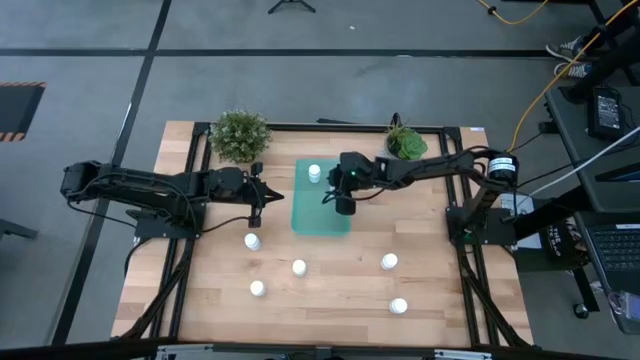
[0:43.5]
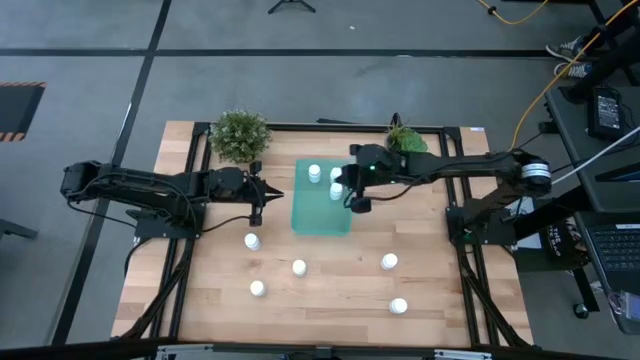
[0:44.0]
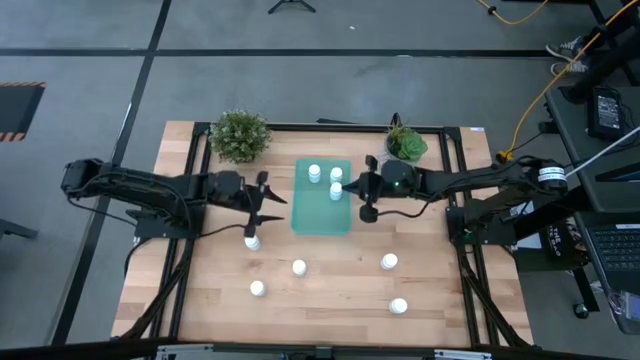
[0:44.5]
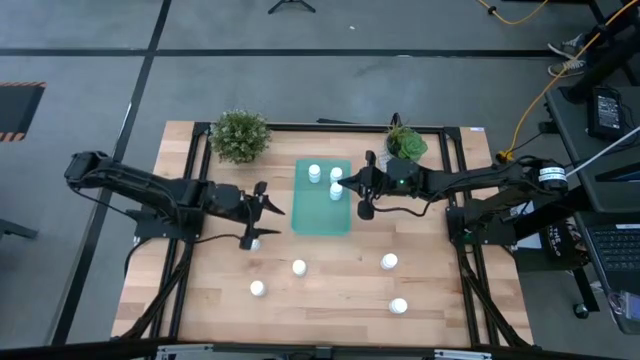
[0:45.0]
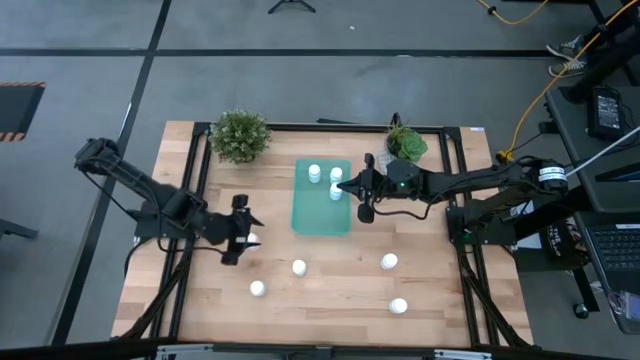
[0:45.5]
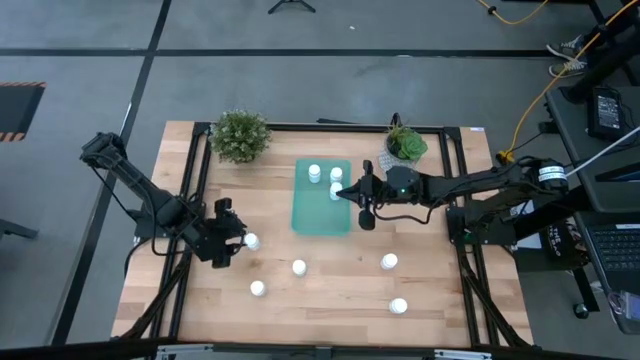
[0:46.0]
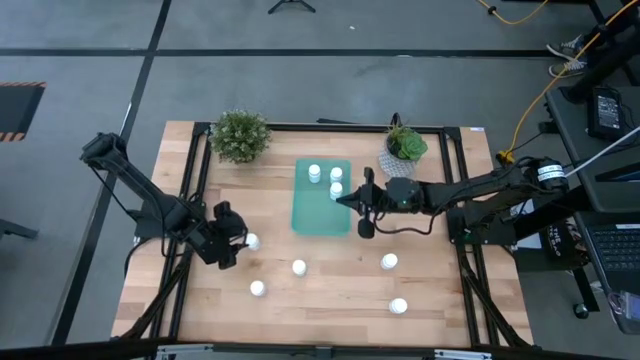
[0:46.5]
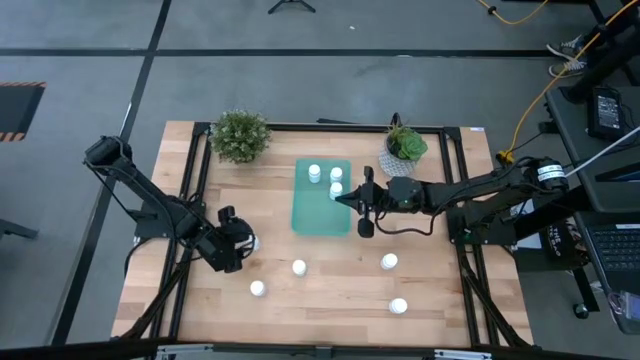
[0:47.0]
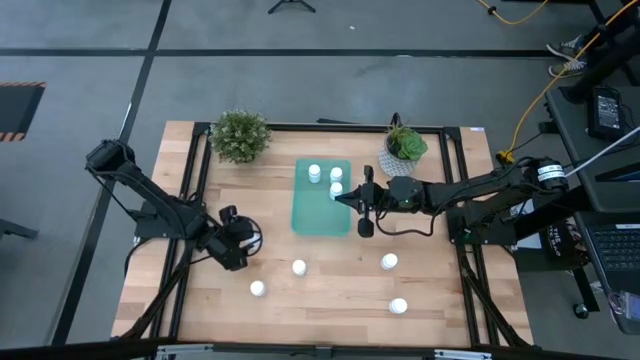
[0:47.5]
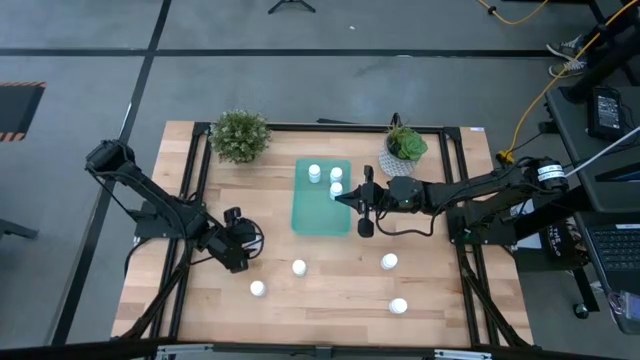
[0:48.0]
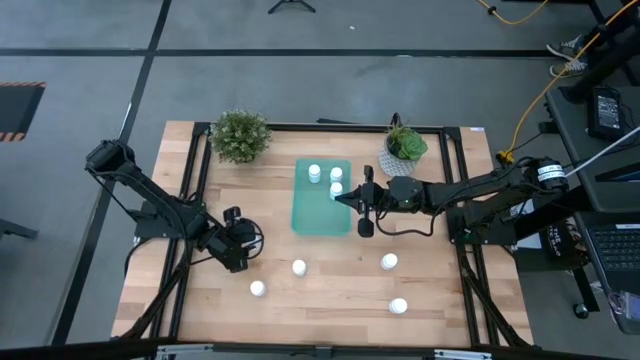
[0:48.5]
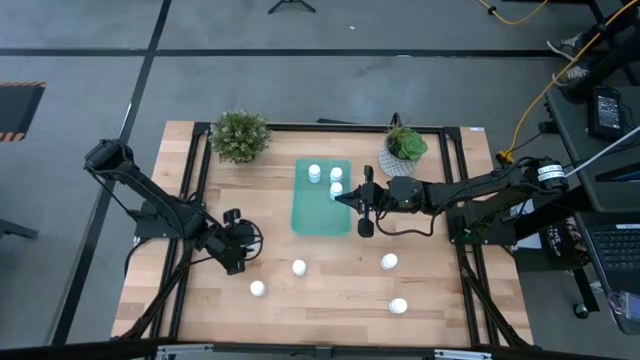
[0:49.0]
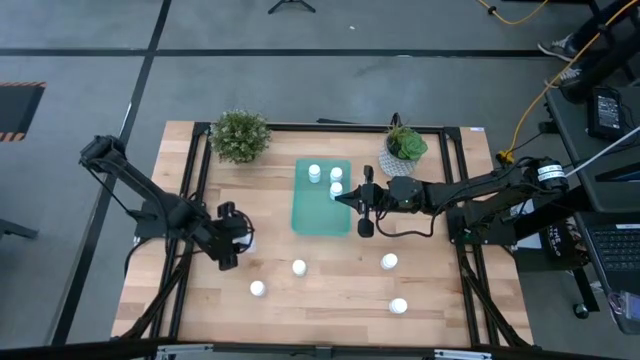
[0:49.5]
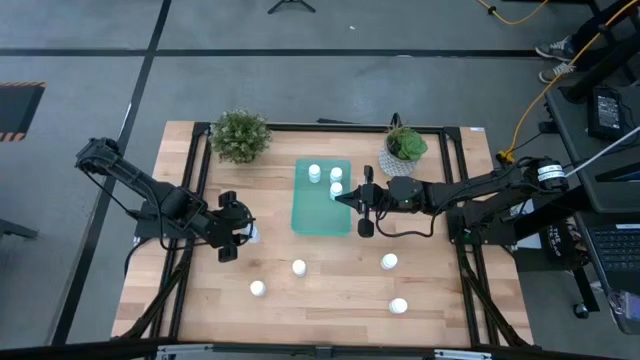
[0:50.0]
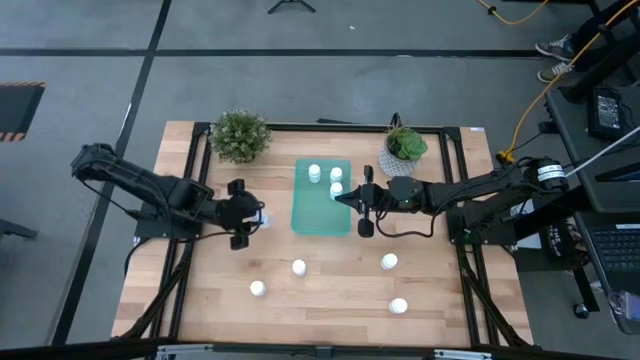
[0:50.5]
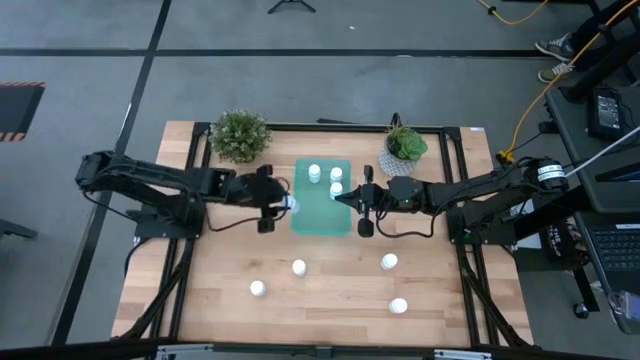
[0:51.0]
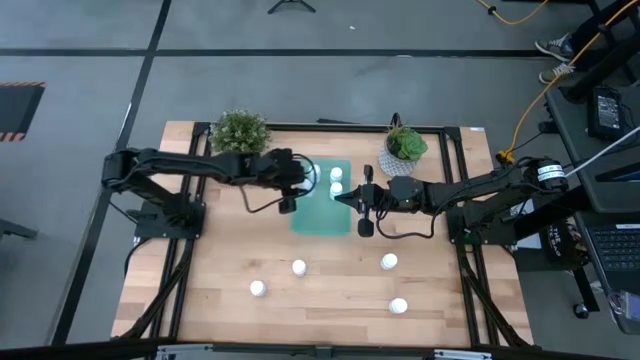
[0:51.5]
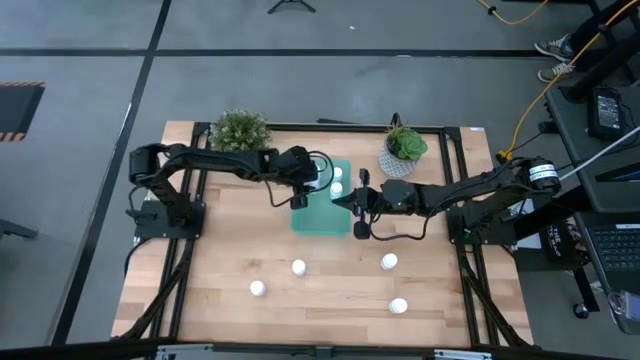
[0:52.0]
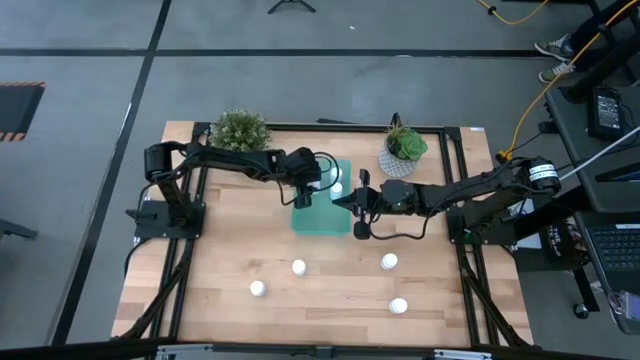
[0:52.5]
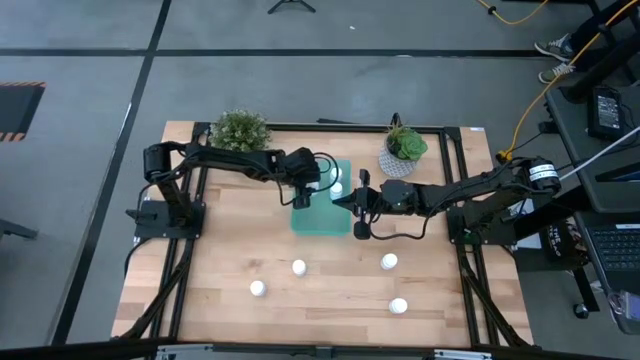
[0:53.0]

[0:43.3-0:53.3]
Task: Pick and place pill bottles into a basket
Put the white pill bottle into the green bin

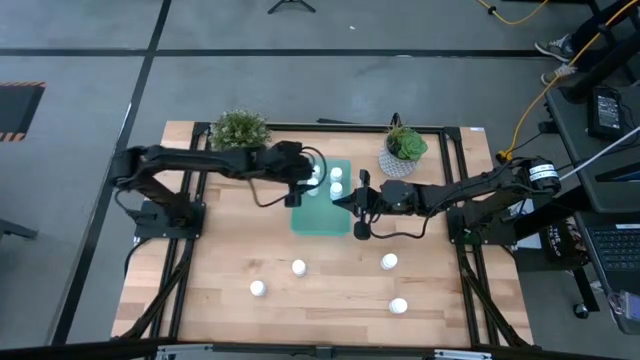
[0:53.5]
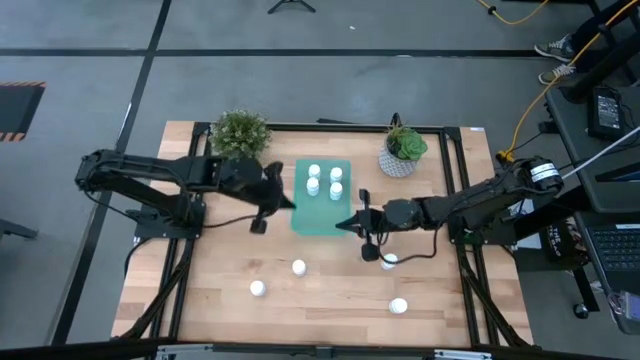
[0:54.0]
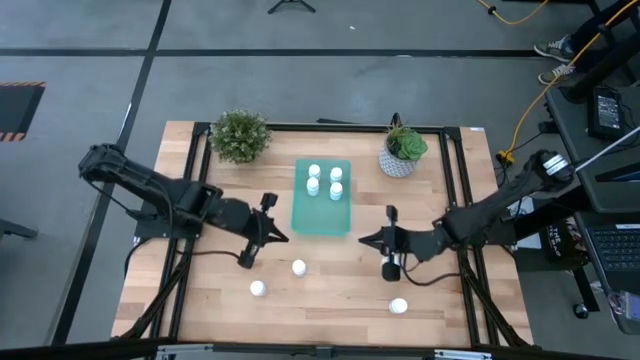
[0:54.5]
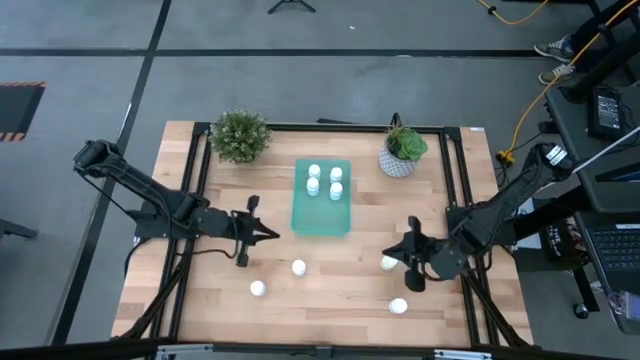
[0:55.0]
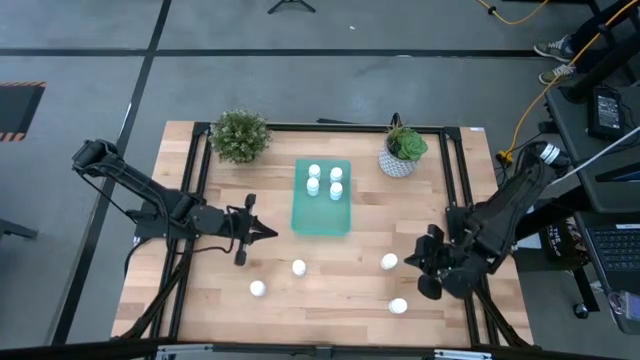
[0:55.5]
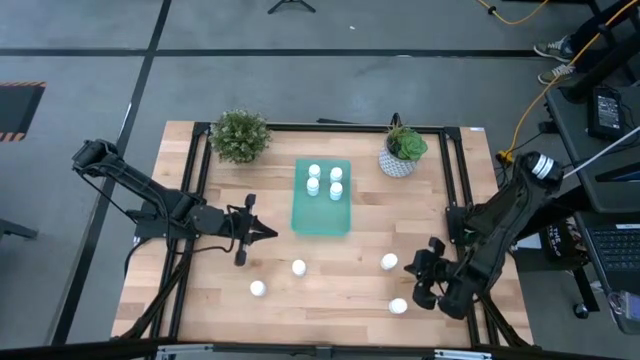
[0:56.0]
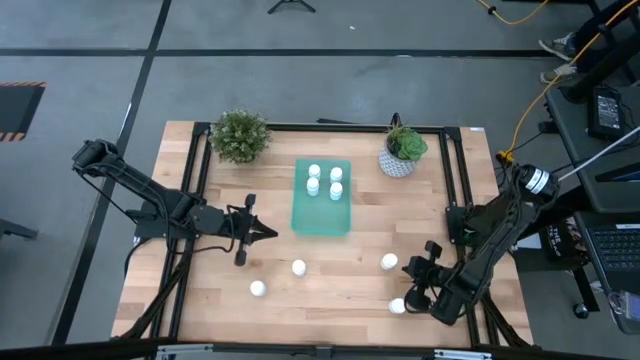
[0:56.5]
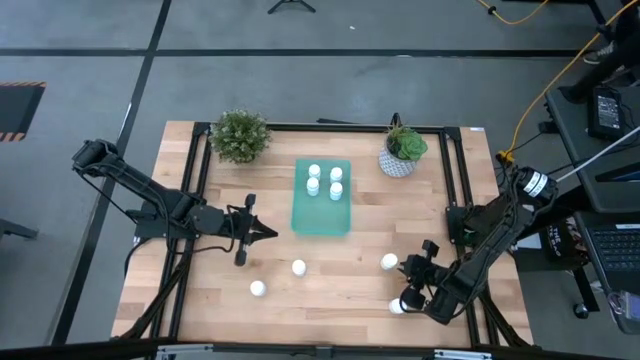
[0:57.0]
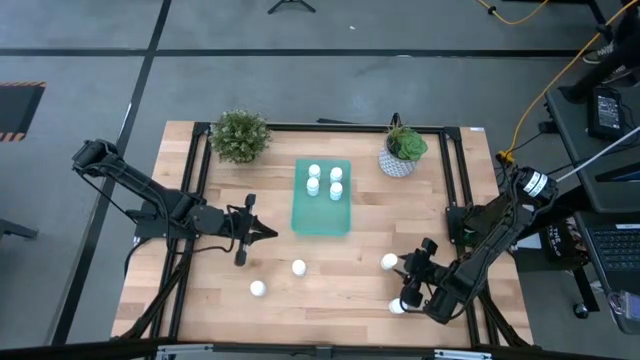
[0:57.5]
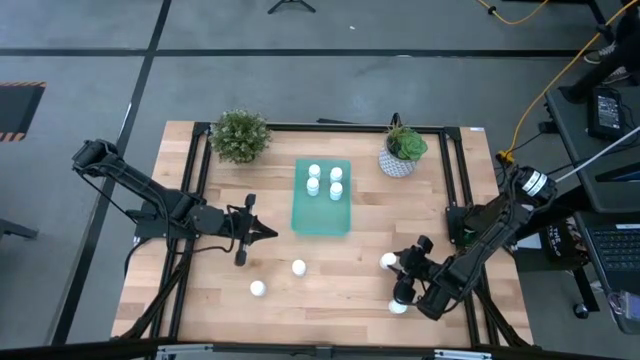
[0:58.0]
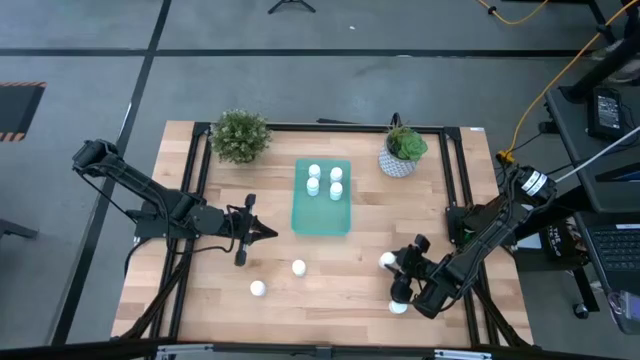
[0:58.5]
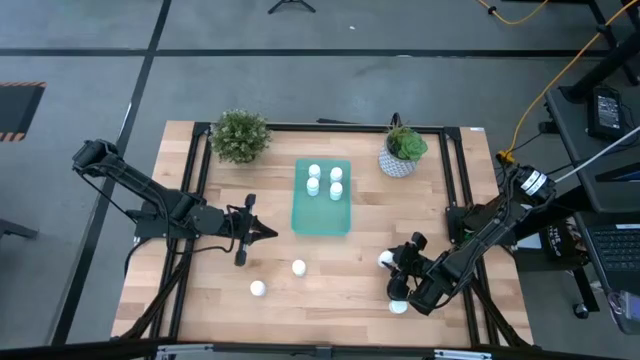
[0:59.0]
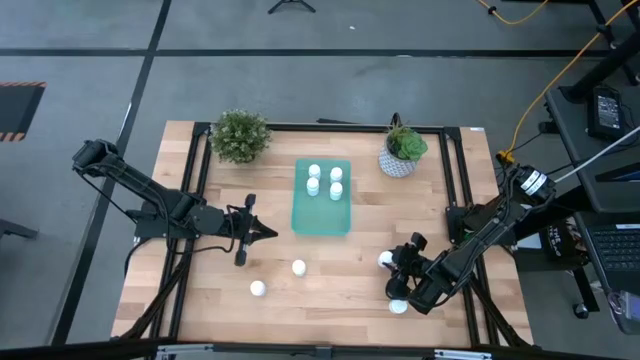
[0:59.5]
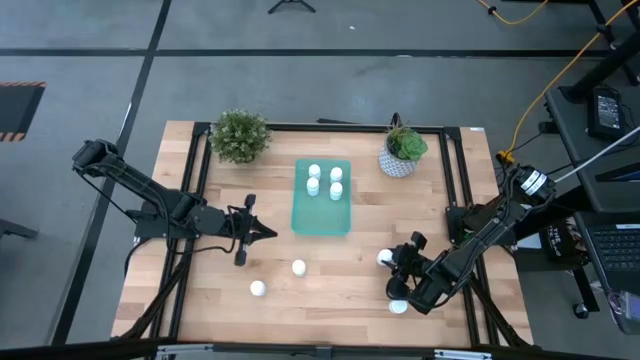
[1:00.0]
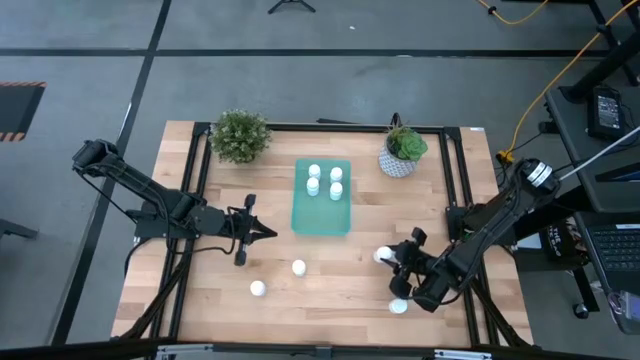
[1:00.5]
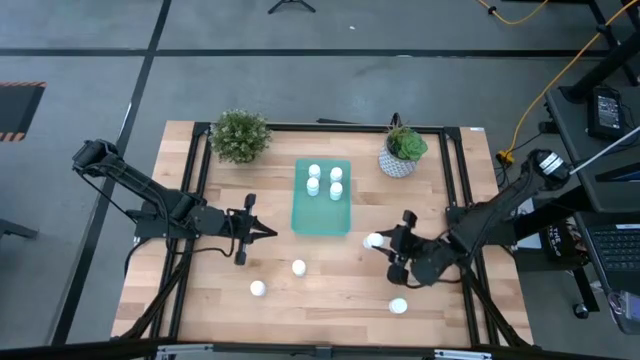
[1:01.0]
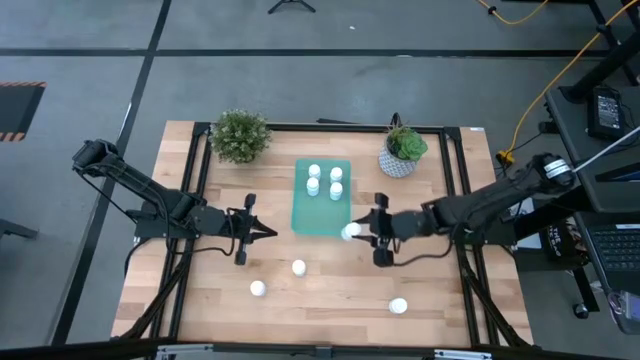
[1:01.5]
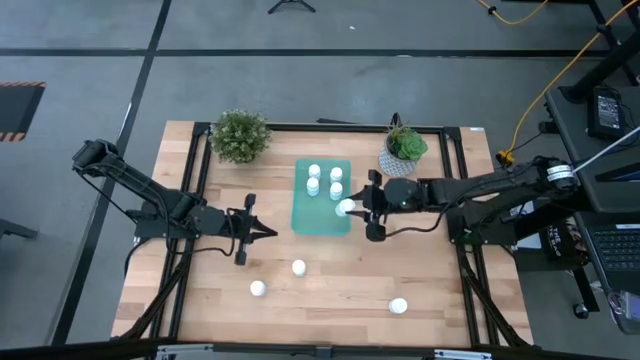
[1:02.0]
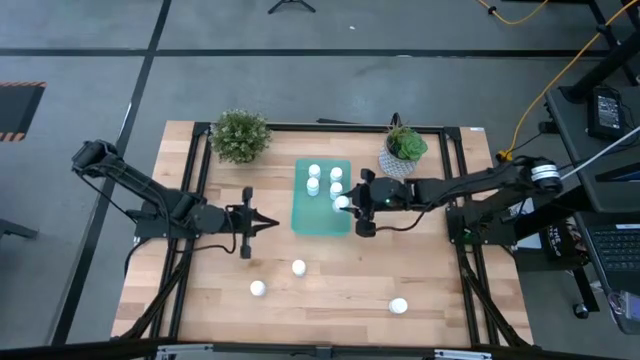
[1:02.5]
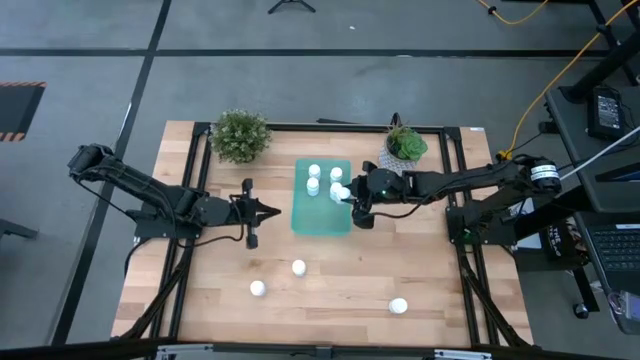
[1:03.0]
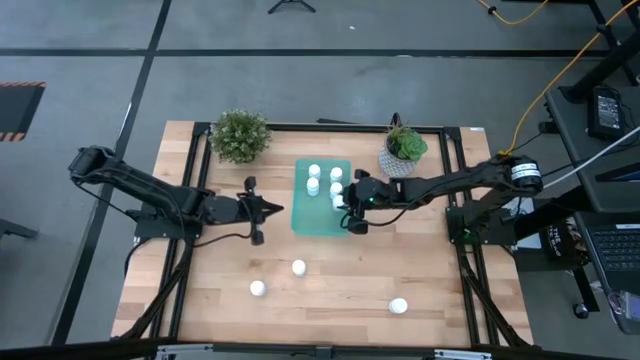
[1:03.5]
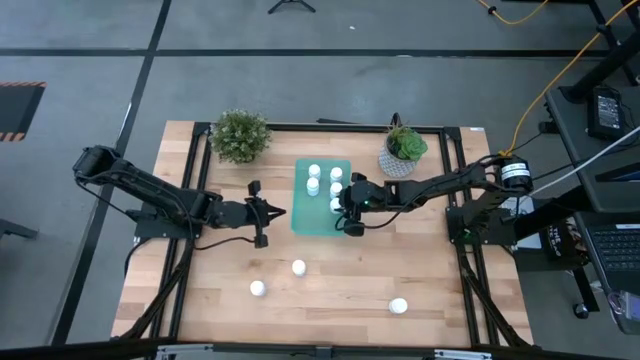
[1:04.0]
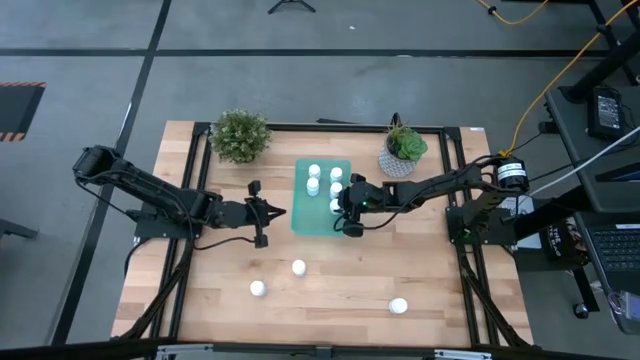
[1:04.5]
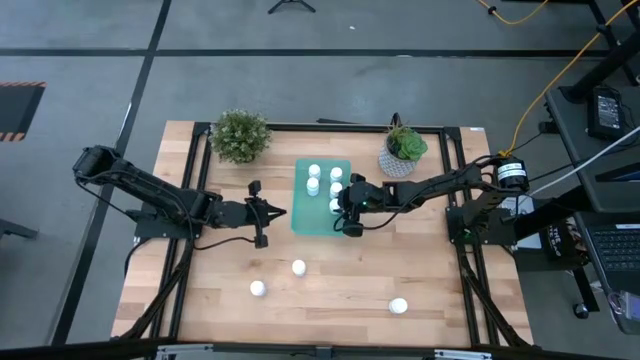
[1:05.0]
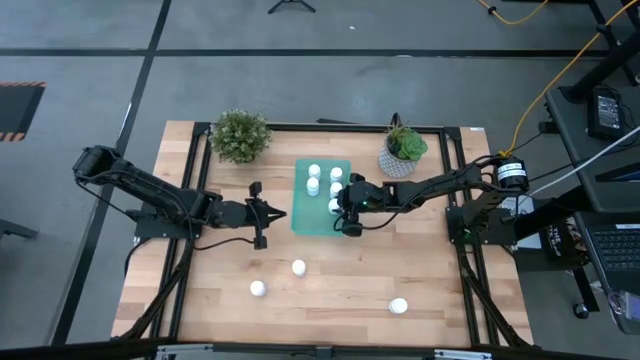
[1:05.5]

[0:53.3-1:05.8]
Put the white pill bottle into the green bin
